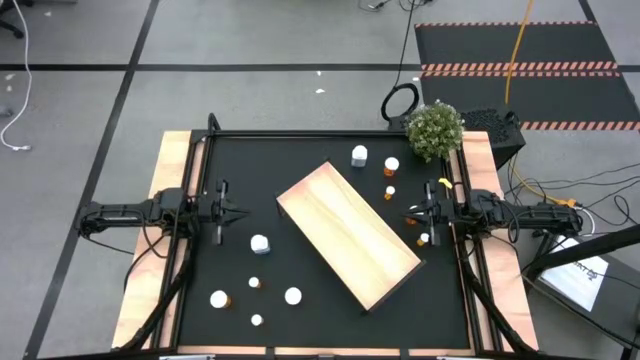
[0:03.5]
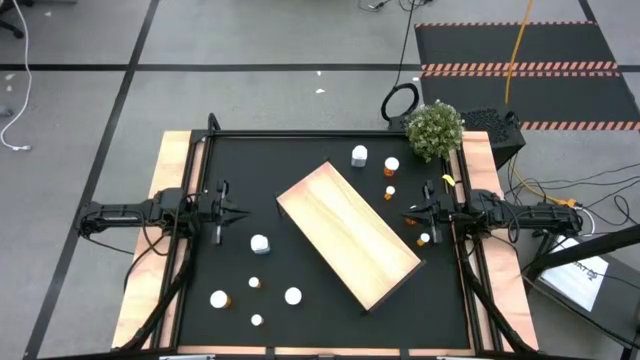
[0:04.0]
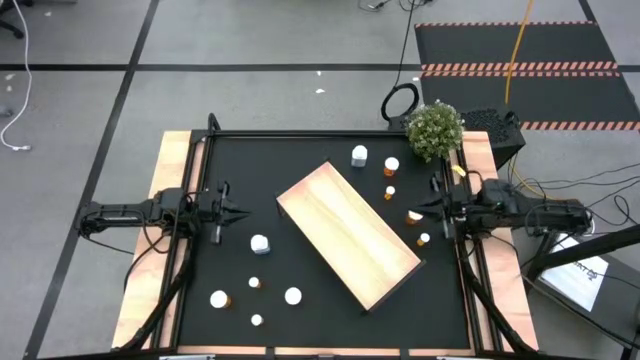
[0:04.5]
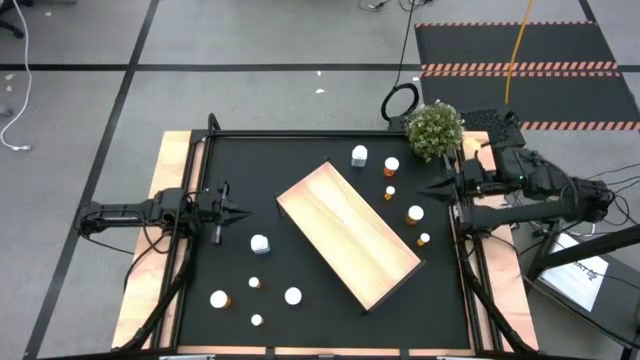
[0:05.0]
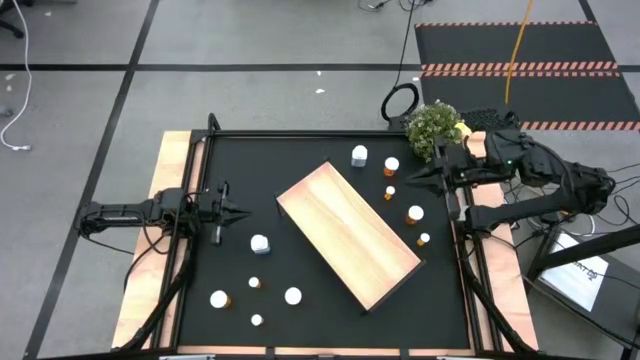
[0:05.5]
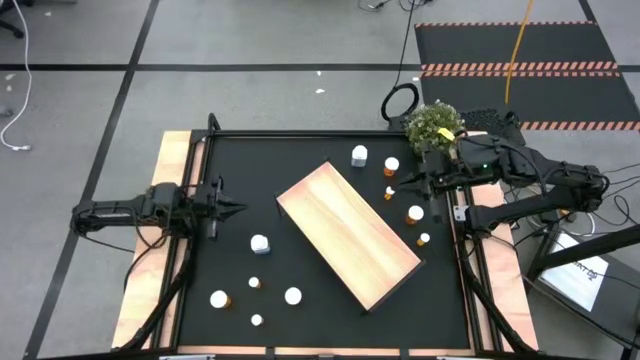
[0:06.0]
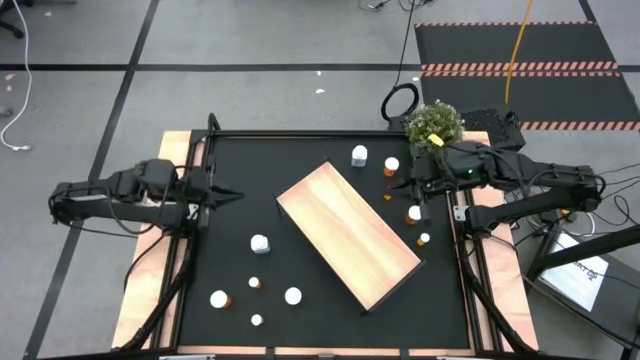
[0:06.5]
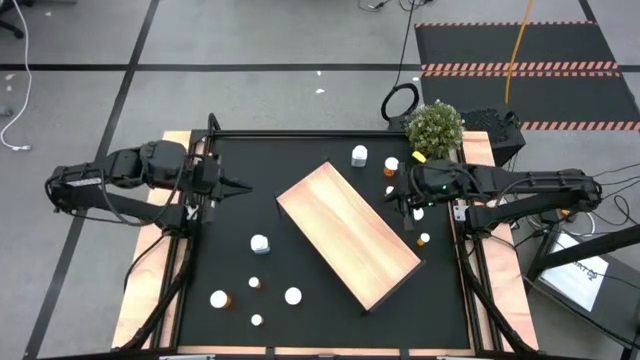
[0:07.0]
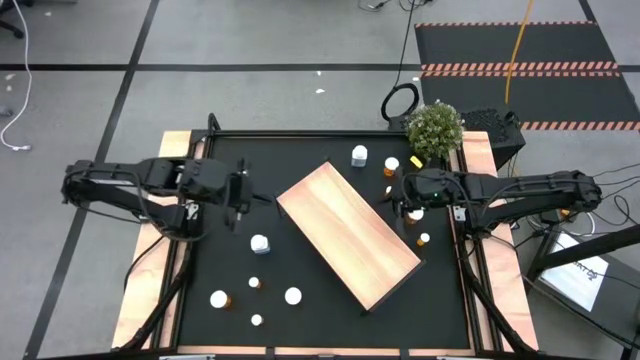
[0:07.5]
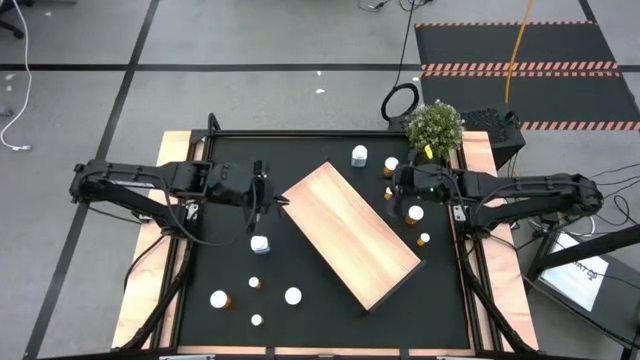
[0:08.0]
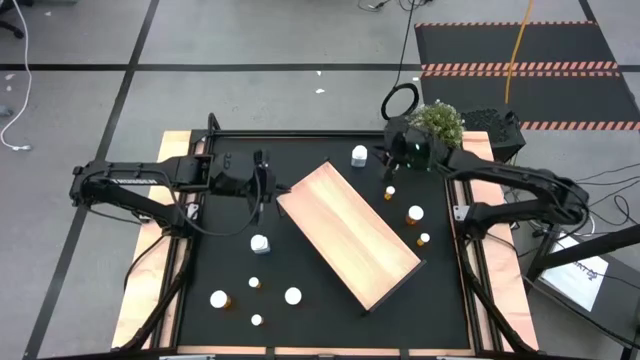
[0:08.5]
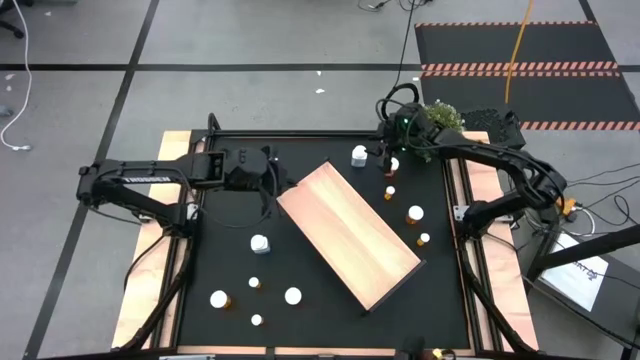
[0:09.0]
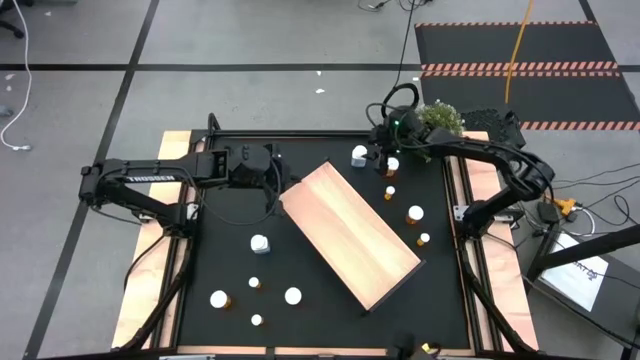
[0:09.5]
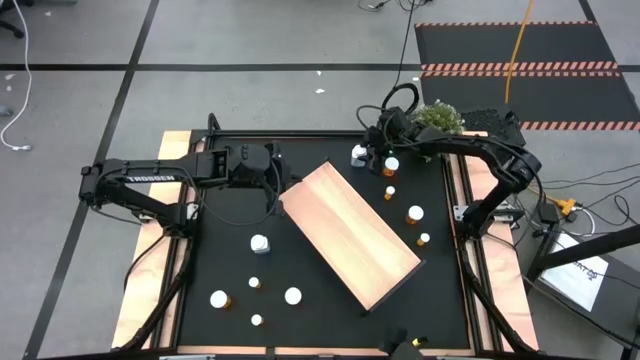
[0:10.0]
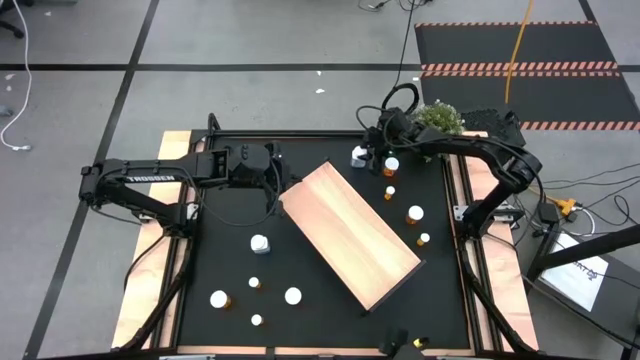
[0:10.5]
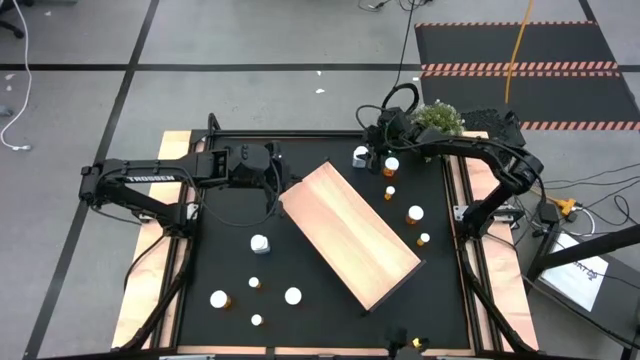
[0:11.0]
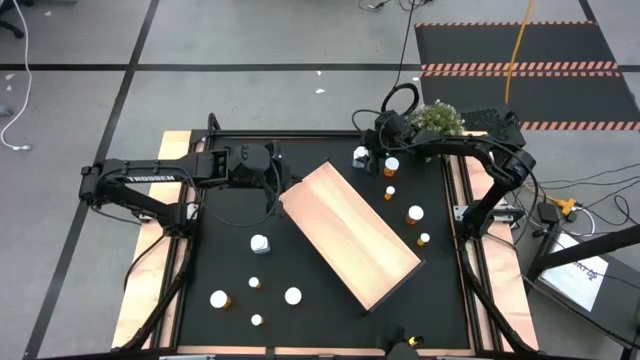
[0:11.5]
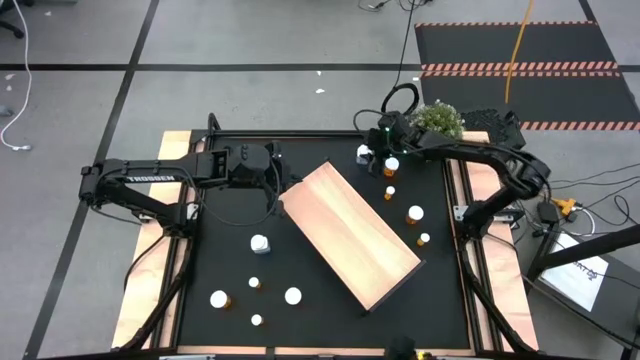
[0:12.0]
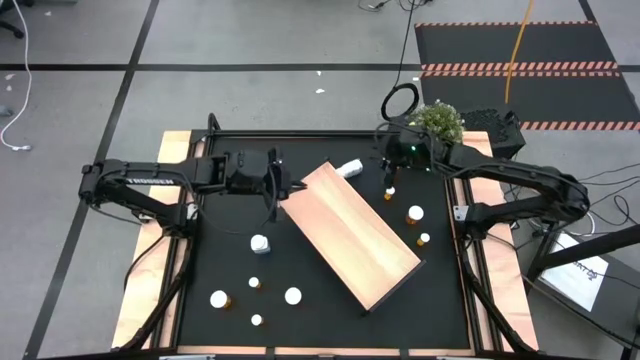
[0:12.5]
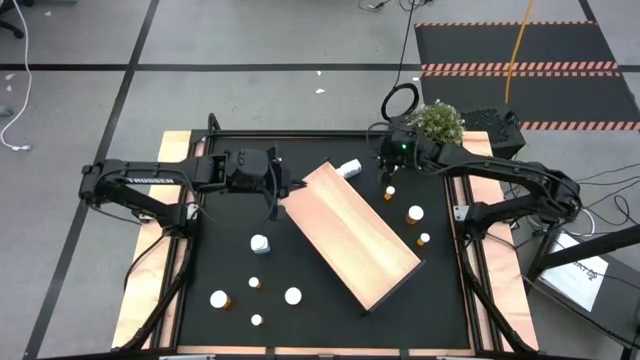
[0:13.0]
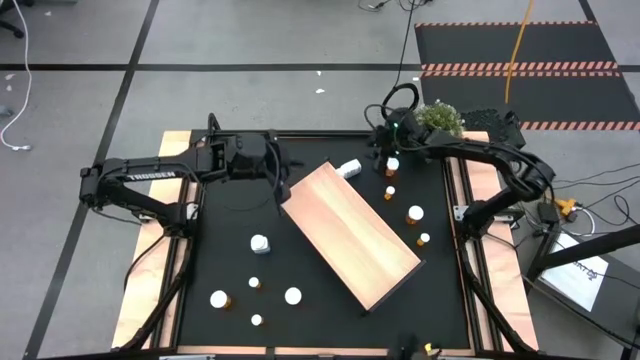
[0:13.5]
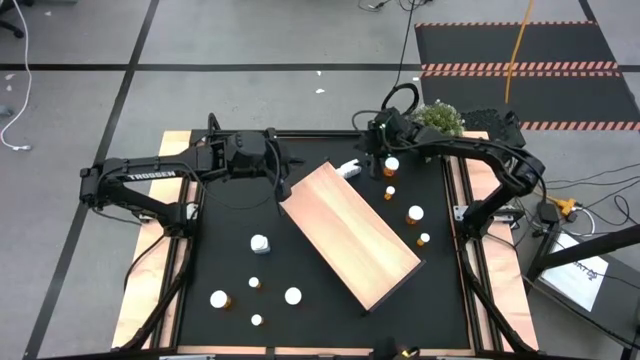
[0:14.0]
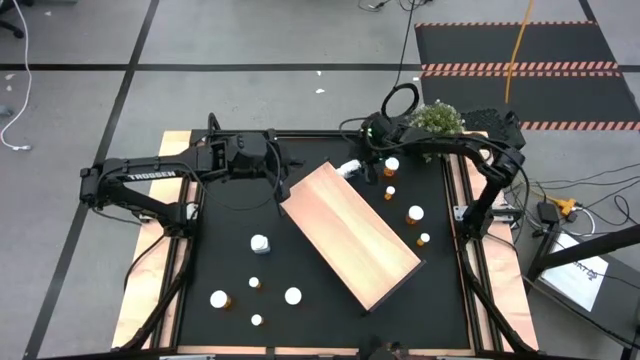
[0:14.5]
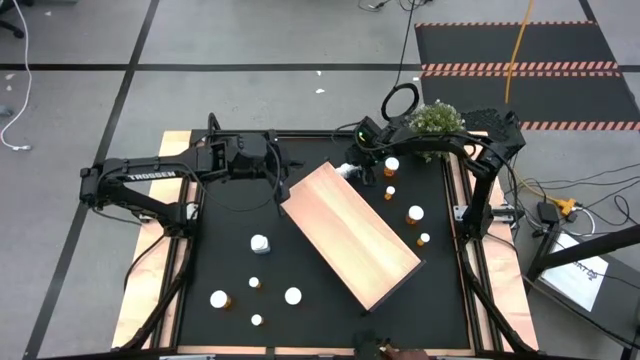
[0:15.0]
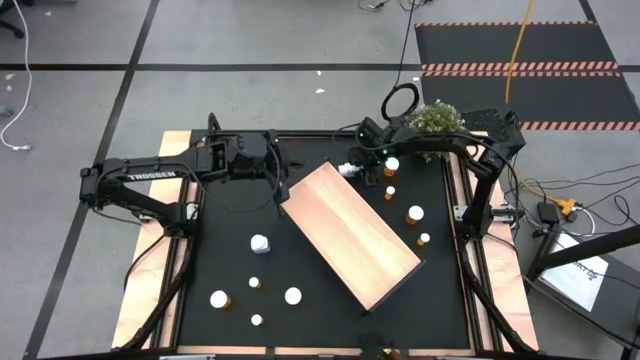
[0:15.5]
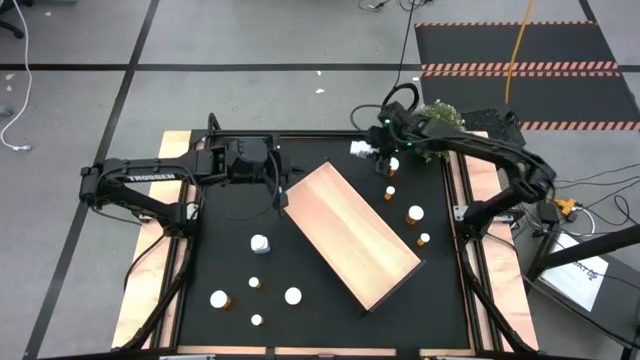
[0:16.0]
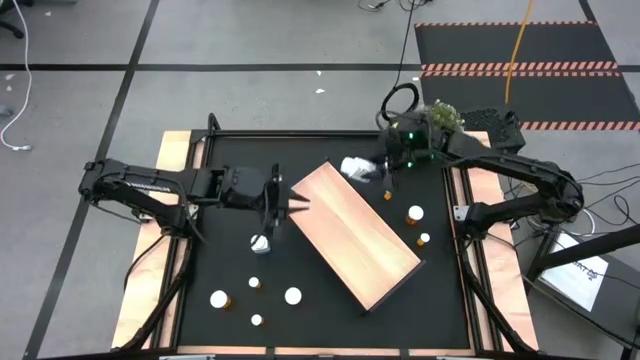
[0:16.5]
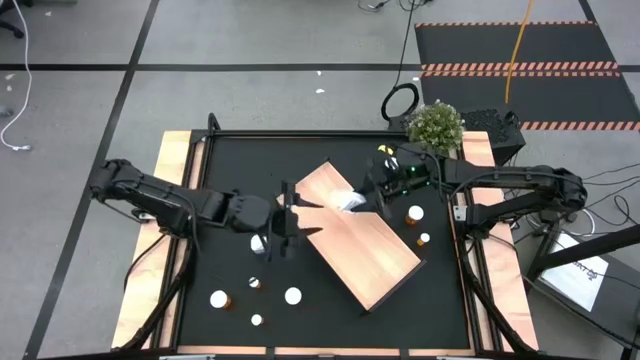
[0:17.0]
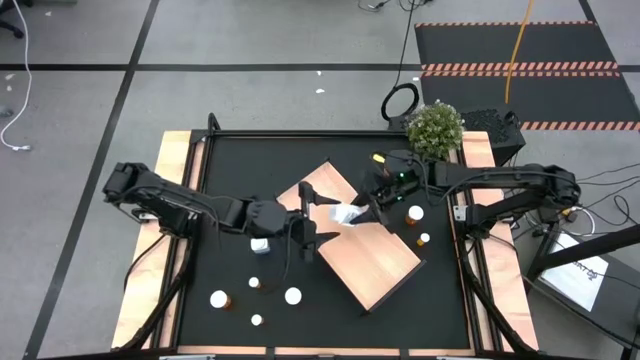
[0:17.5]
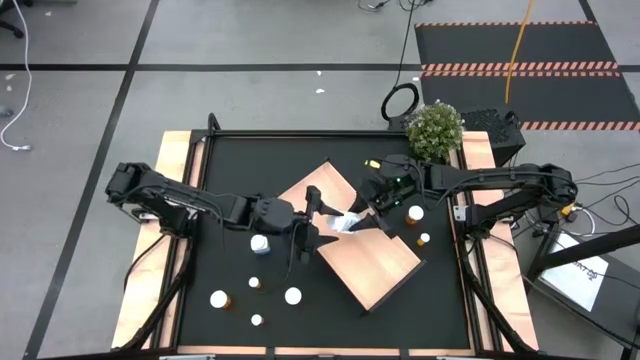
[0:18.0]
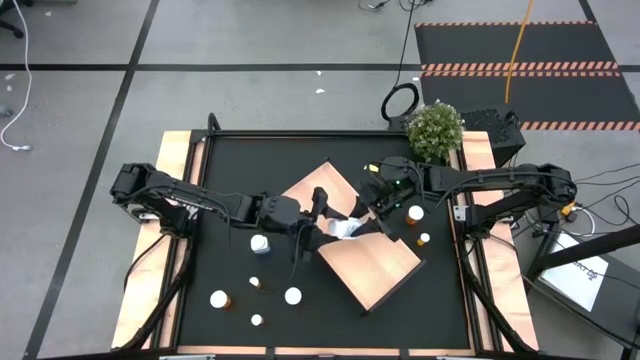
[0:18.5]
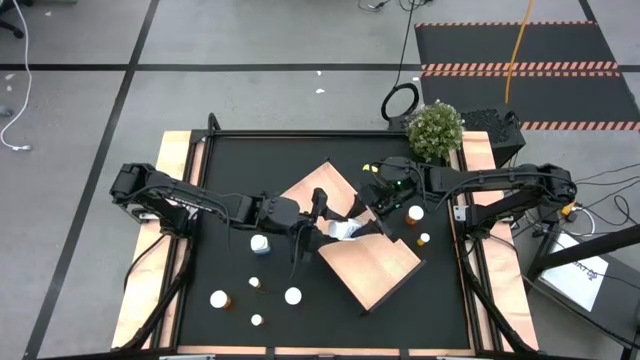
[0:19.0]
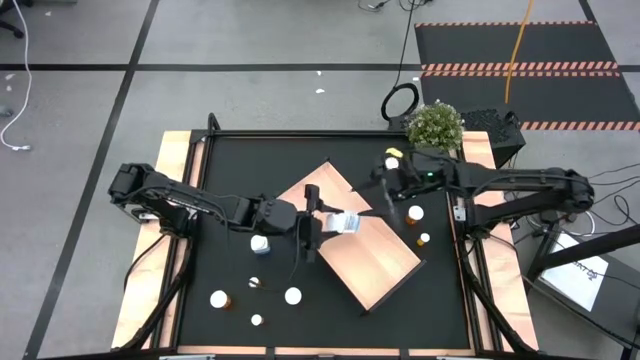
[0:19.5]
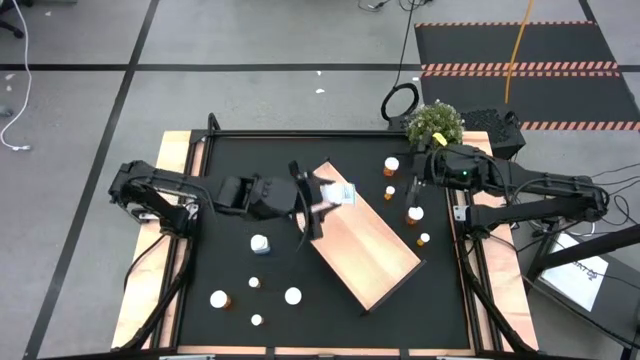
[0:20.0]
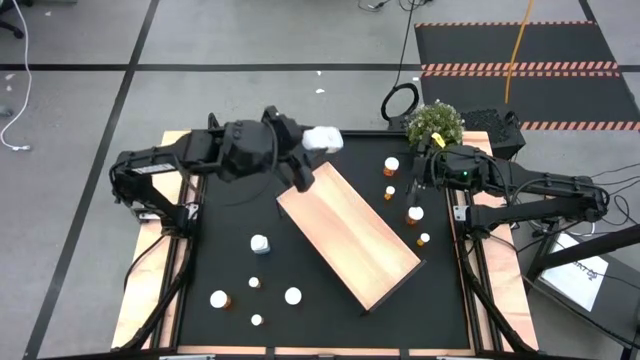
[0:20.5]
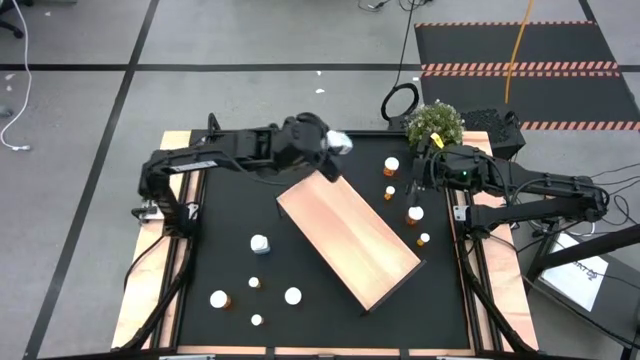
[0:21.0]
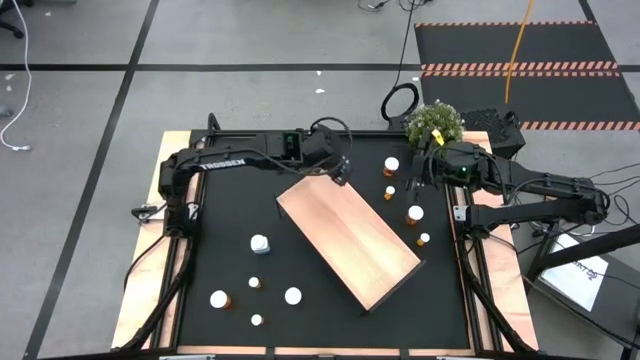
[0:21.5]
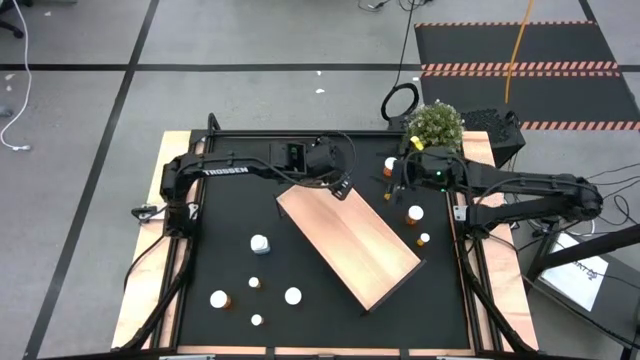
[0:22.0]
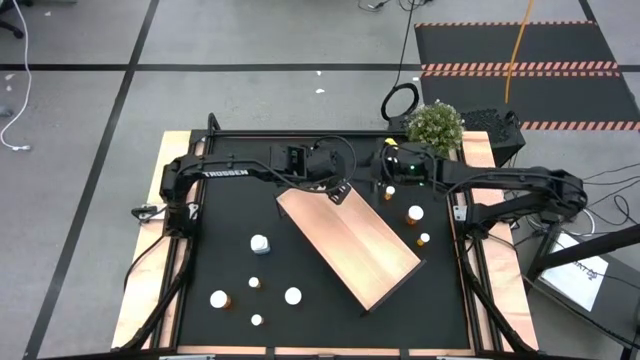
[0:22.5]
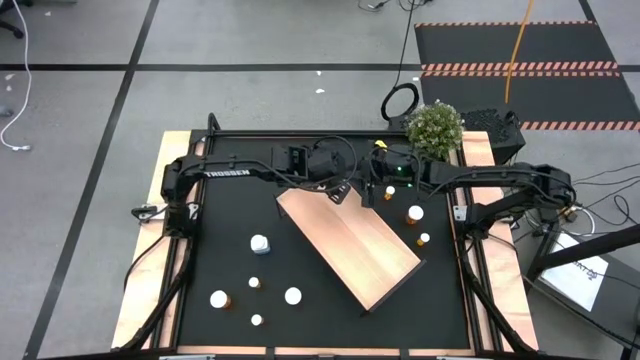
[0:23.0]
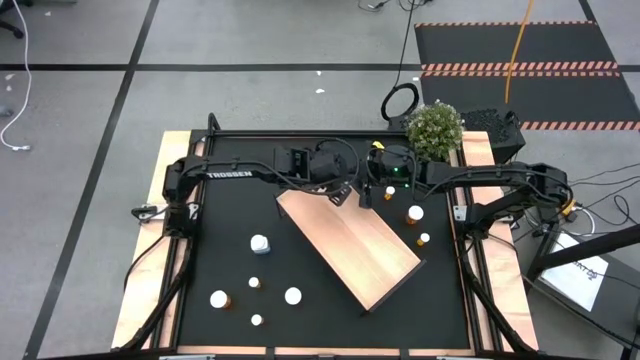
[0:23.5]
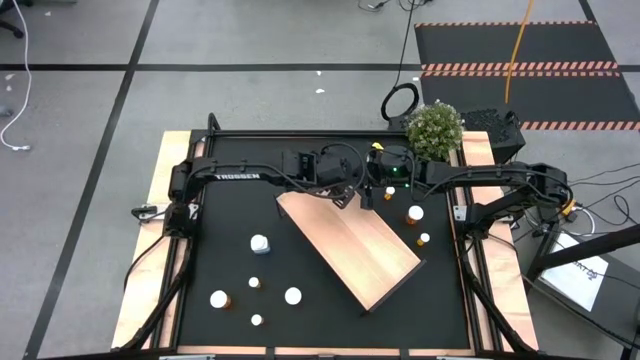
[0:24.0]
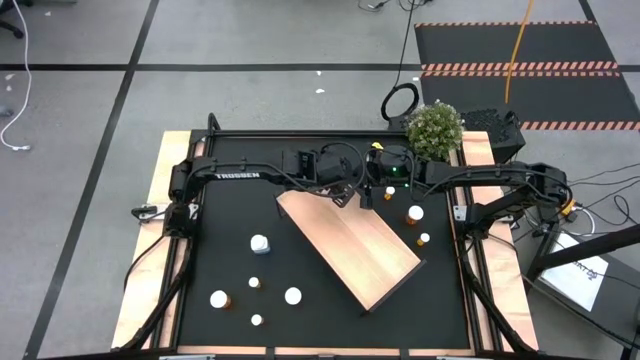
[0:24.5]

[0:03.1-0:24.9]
Task: Pick and place medicine bottles onto shelf by color
Put the top white pill bottle on the shelf
